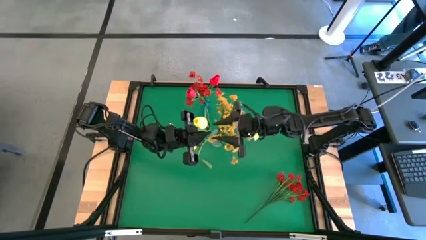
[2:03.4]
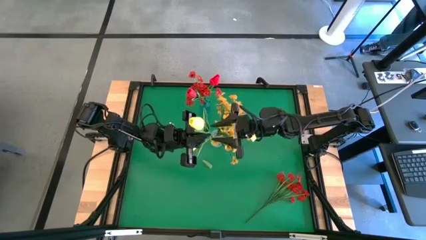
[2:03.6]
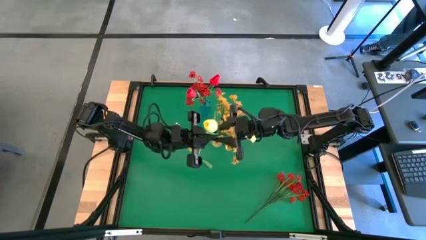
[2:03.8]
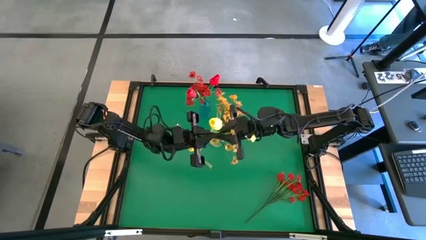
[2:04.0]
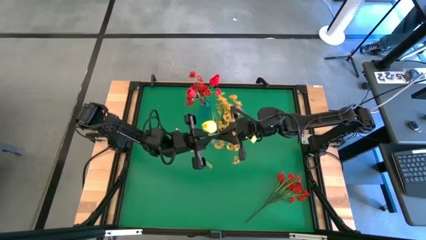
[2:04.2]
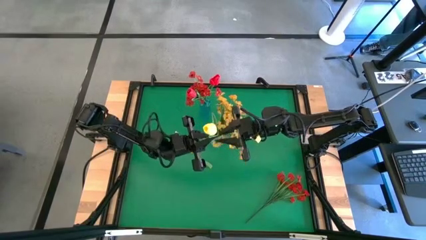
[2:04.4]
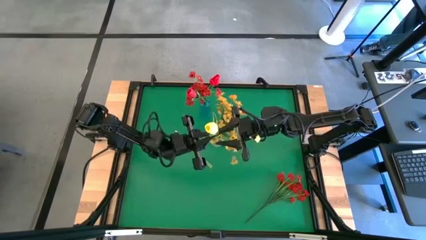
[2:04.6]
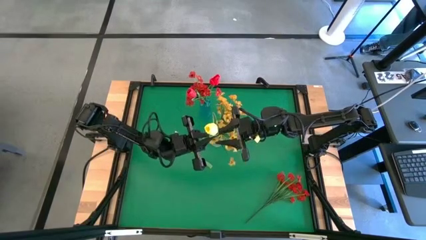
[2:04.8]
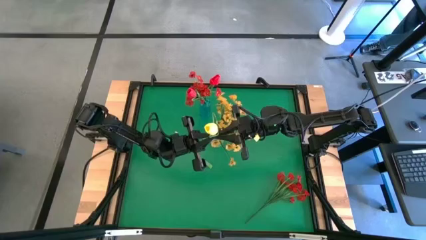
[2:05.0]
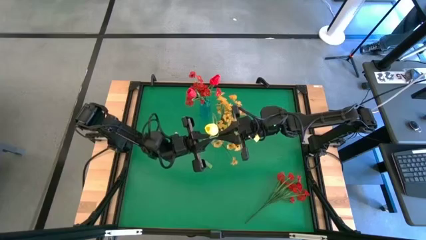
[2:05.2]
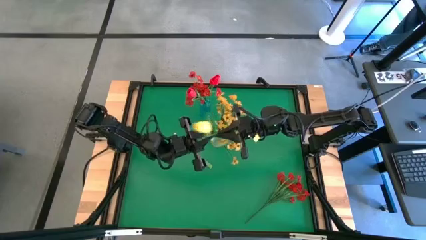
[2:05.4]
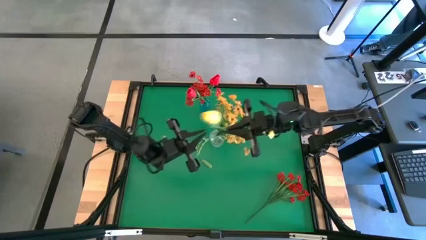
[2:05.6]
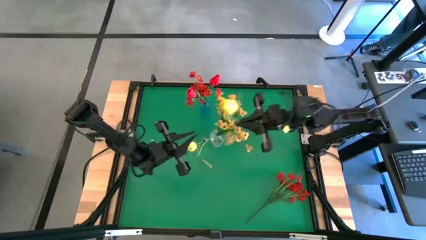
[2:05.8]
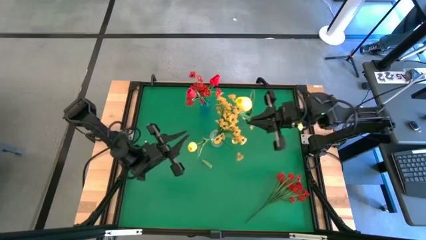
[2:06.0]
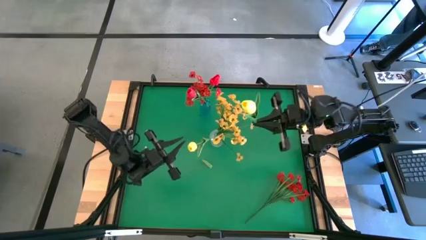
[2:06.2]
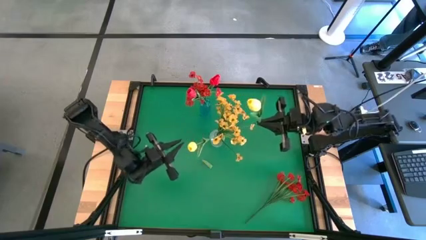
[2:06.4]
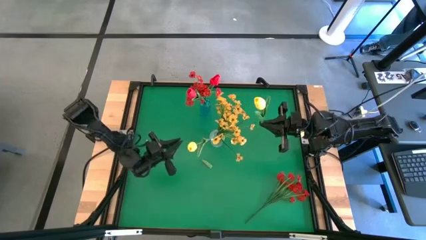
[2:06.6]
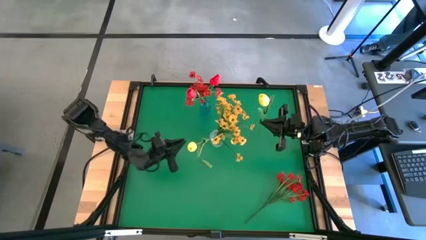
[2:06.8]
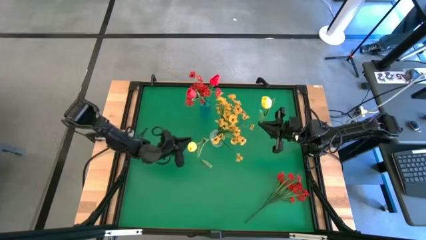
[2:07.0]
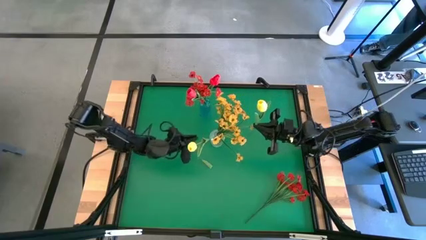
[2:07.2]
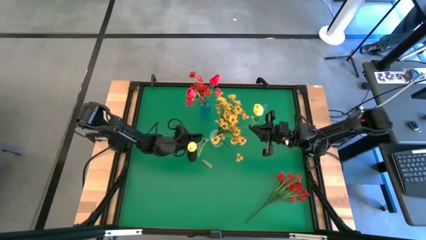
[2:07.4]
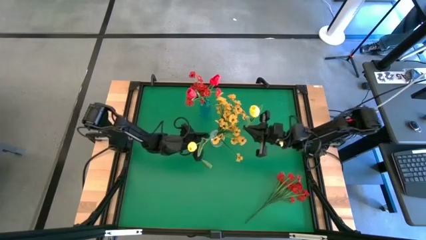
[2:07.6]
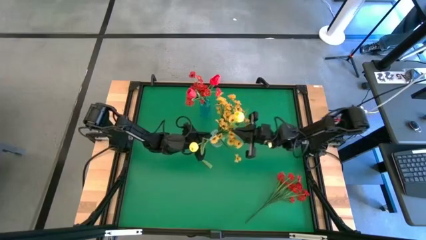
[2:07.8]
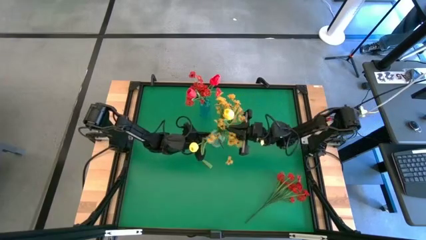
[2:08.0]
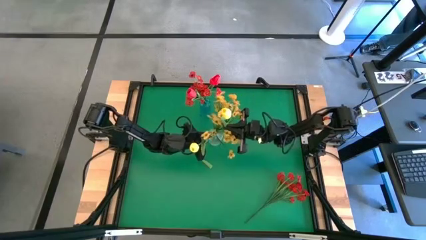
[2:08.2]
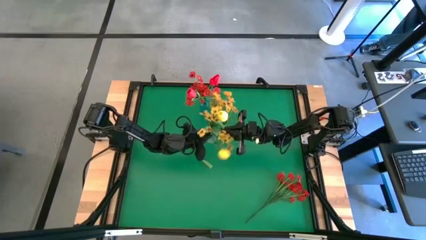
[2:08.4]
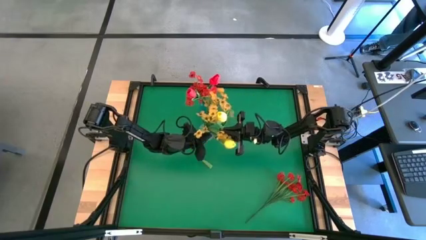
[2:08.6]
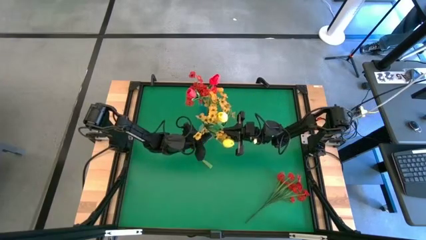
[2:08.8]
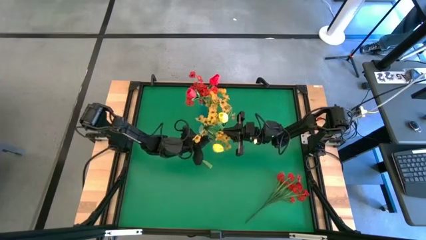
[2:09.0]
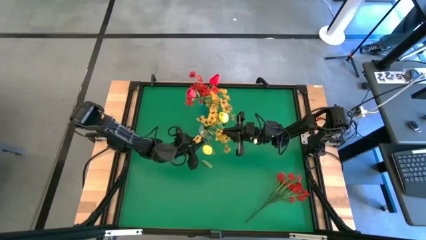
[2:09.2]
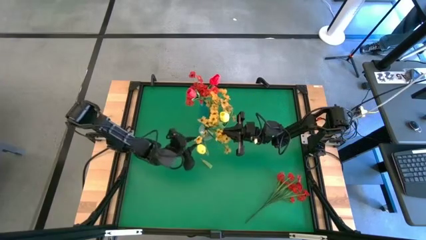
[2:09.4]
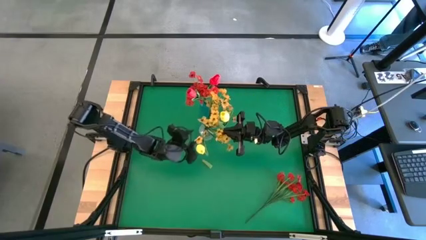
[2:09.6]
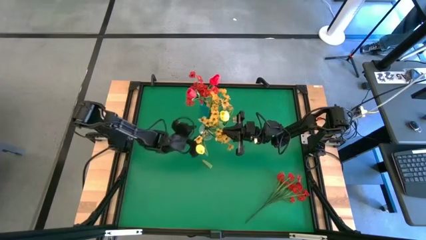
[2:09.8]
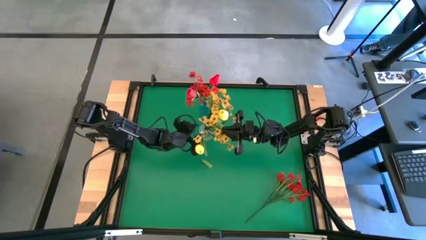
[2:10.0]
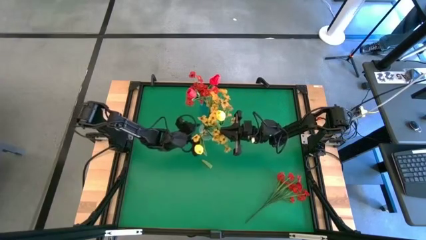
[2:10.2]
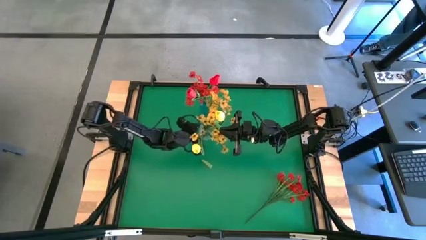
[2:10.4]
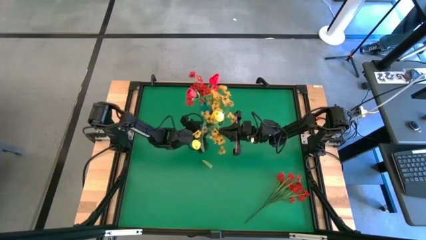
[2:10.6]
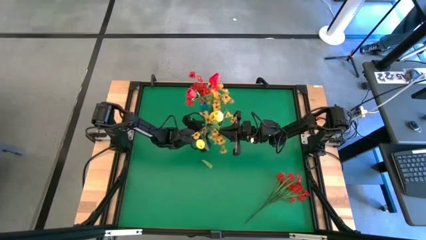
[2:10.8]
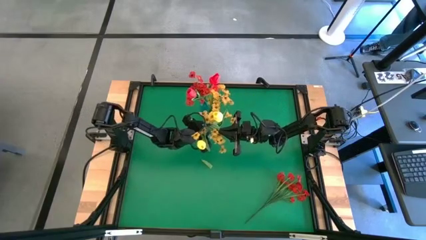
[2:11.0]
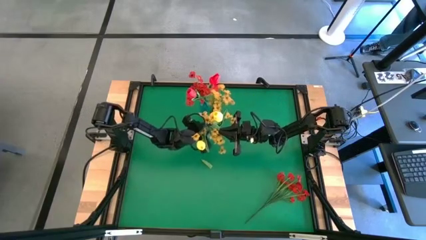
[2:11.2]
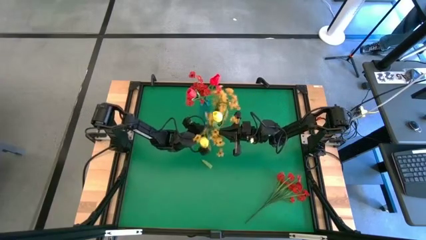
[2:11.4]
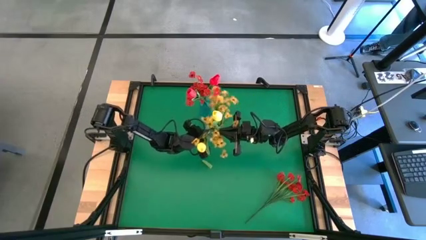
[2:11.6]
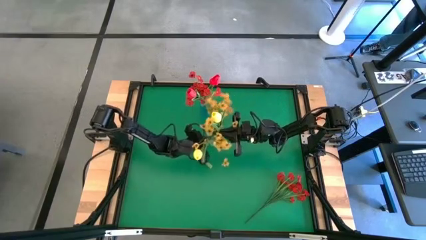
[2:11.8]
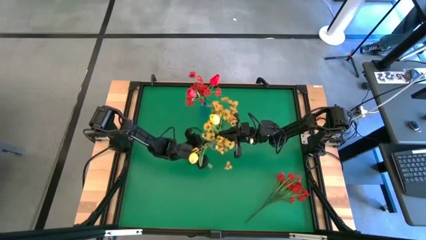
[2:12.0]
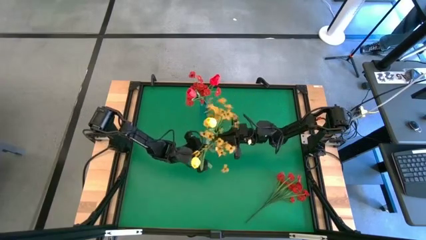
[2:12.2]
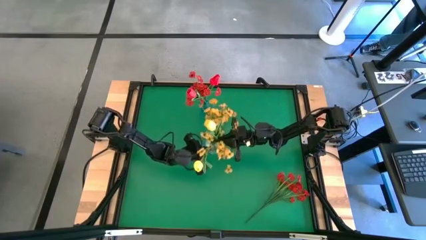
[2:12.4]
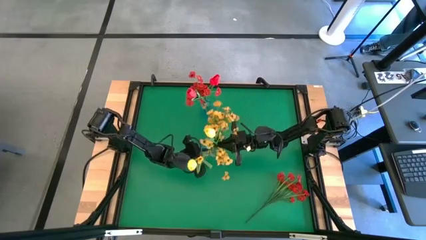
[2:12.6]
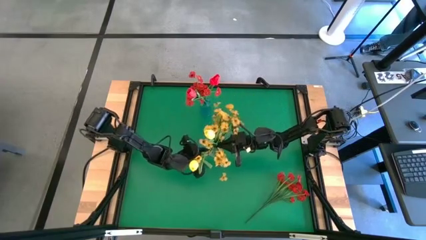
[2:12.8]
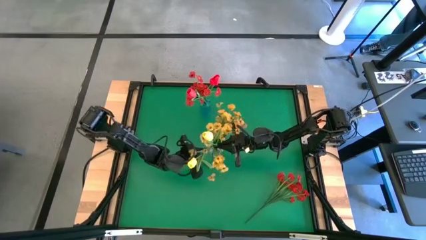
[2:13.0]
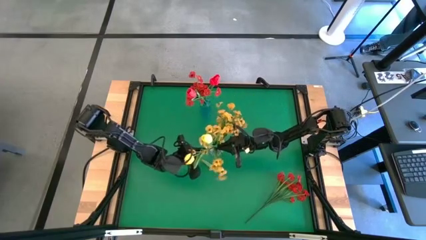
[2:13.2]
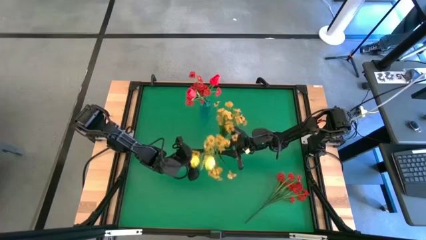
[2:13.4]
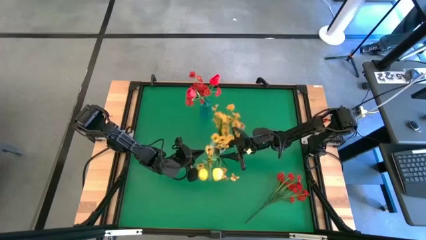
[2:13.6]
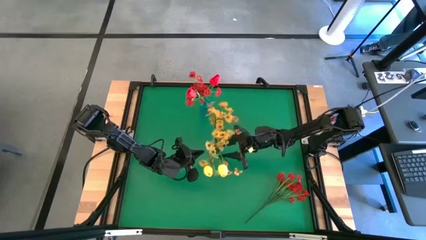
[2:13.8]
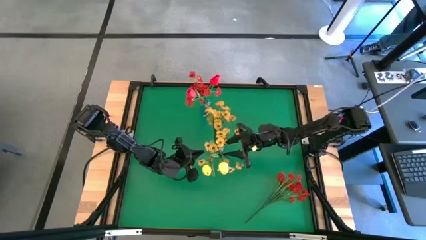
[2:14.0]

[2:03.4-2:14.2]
Task: Sort flowers into vase by color
Put the yellow flower into the transparent vase
